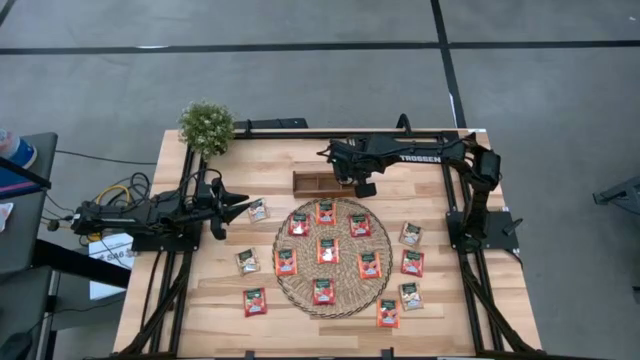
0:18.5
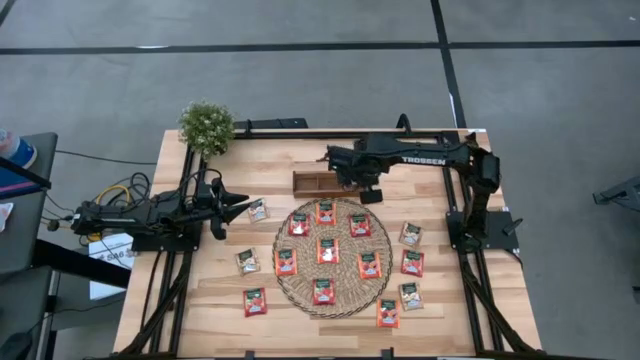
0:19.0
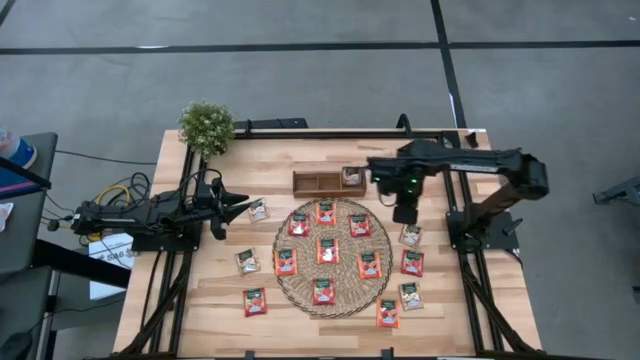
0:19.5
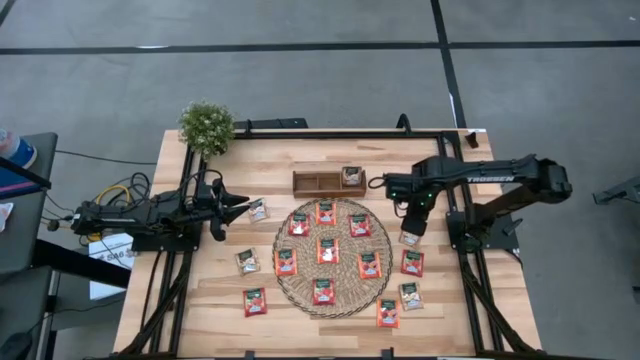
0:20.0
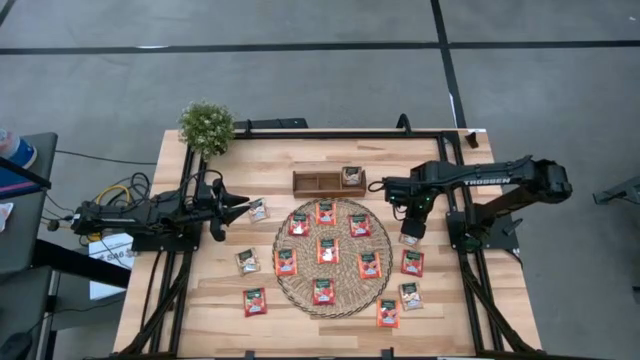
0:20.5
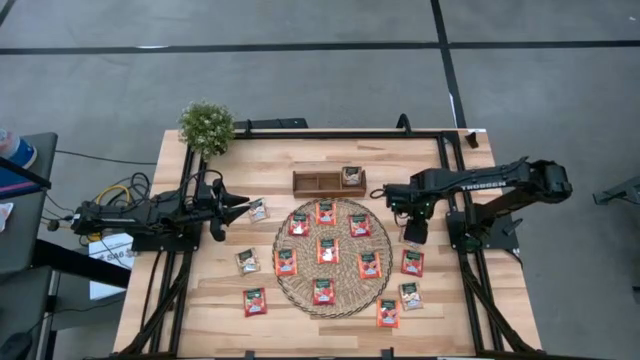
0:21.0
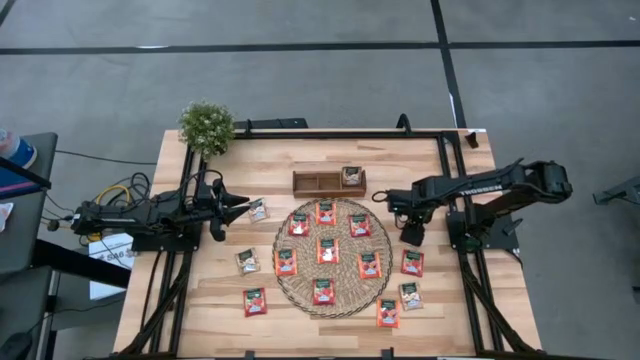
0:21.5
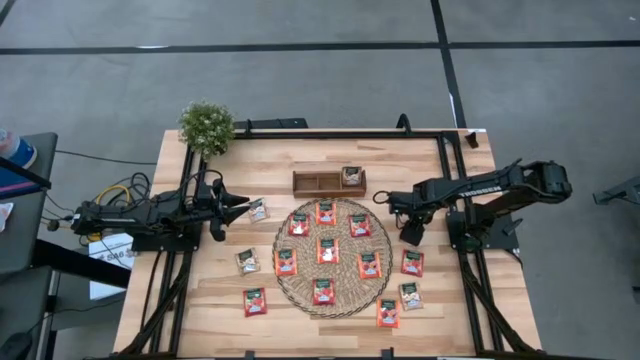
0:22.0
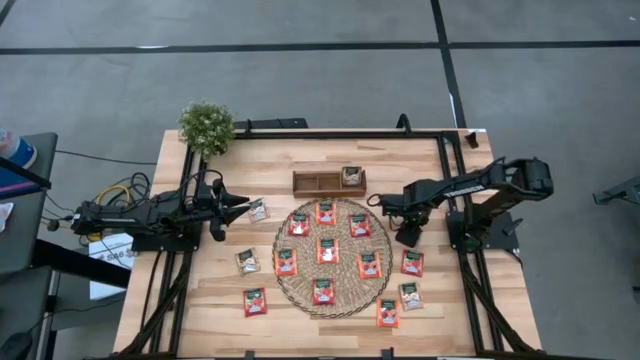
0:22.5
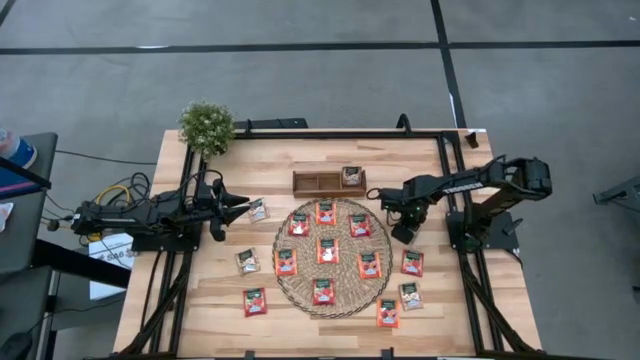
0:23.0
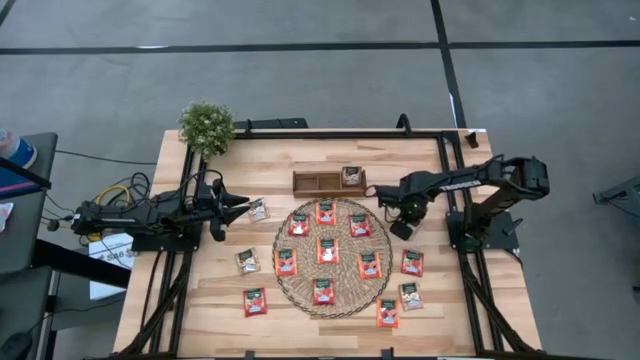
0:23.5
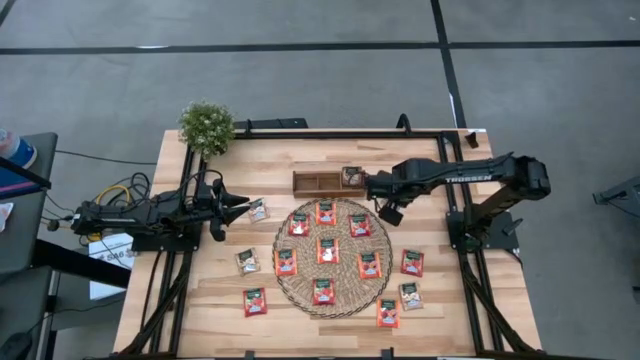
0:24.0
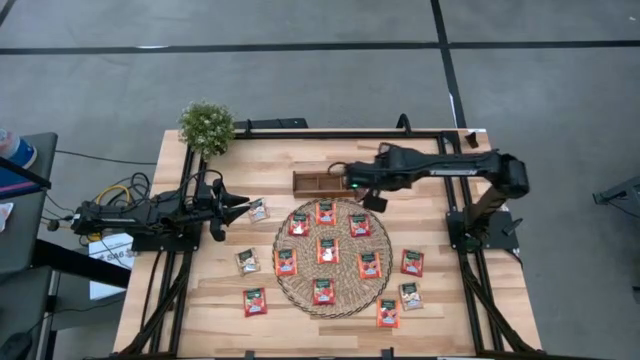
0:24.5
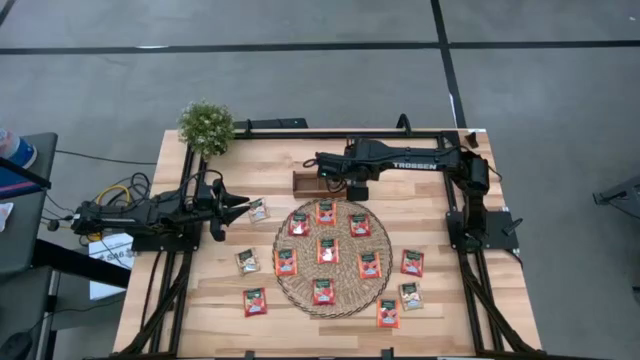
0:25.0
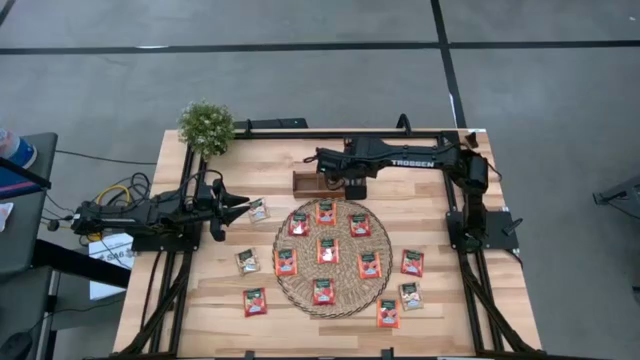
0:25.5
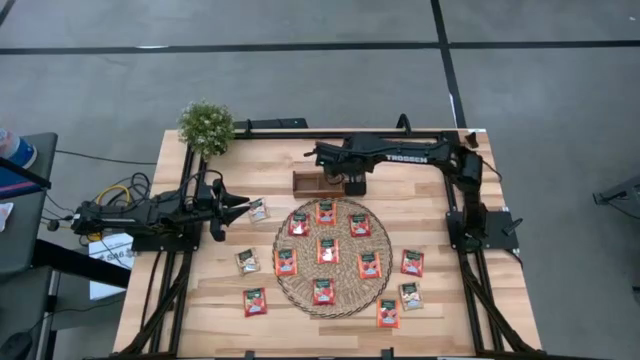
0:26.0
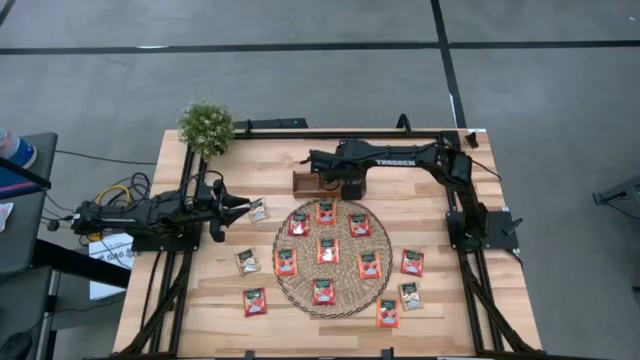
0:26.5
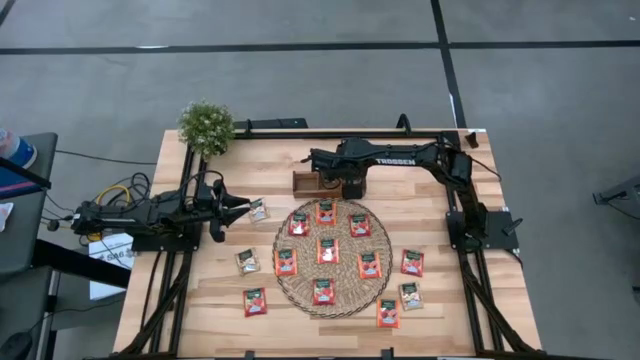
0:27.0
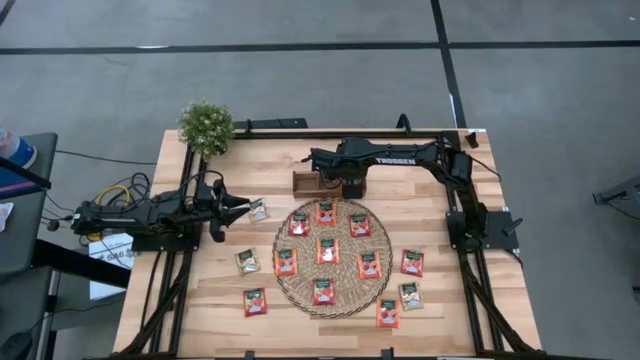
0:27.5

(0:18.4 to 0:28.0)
Task: Pick & Place Tea
Put the brown tea bag into the right section of the wooden organizer

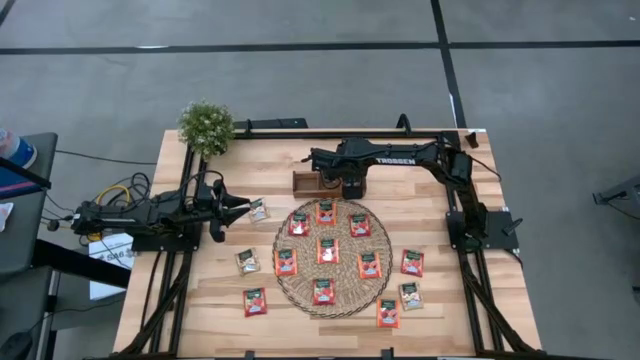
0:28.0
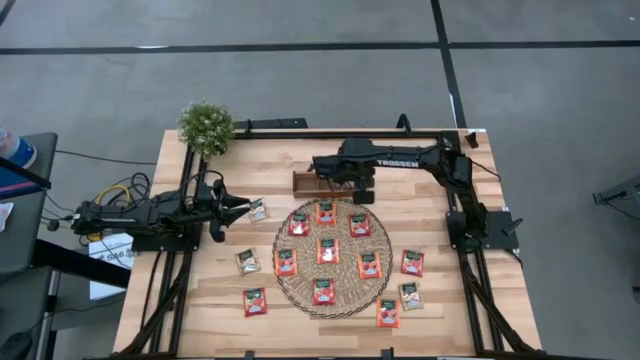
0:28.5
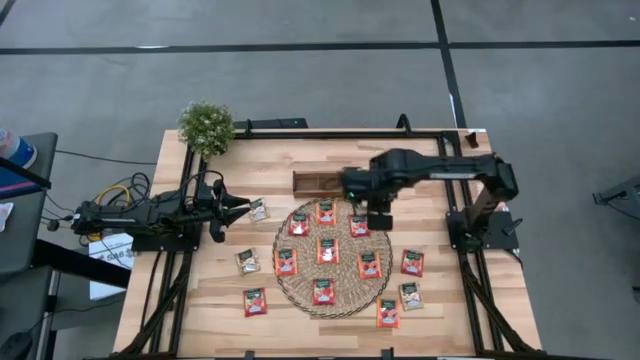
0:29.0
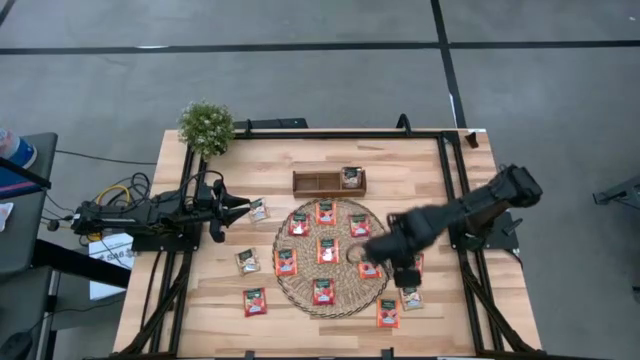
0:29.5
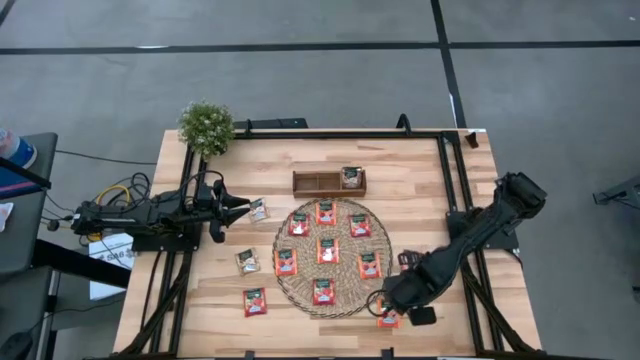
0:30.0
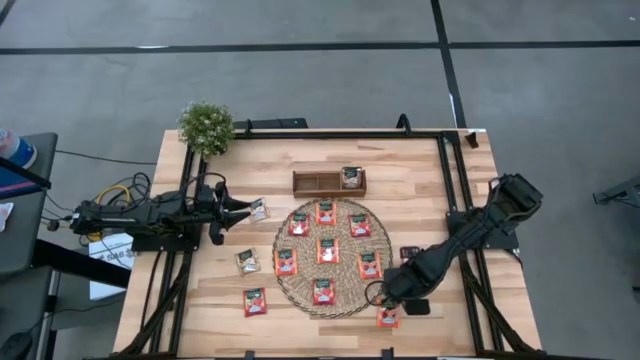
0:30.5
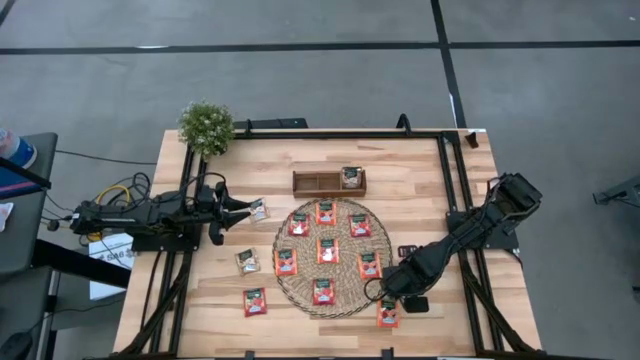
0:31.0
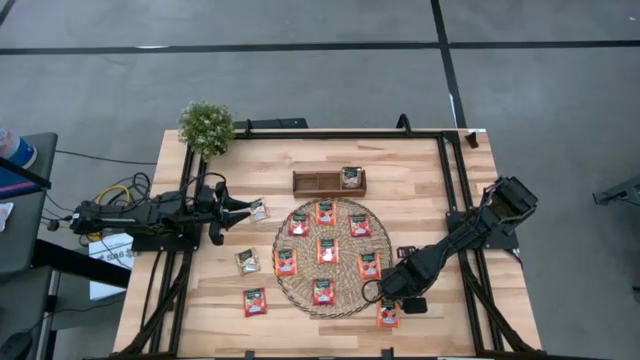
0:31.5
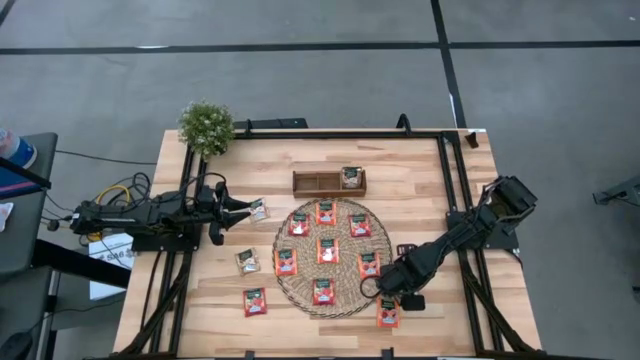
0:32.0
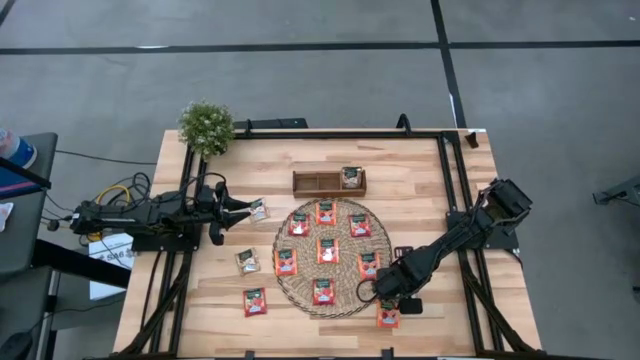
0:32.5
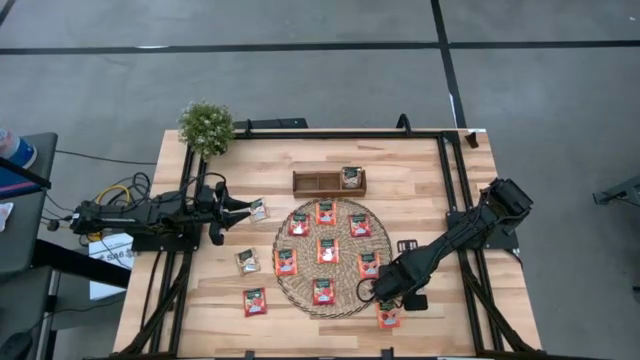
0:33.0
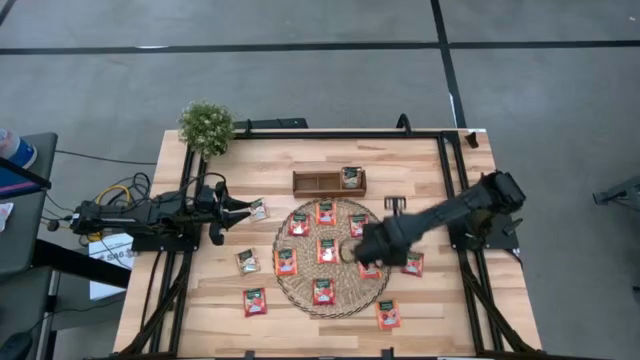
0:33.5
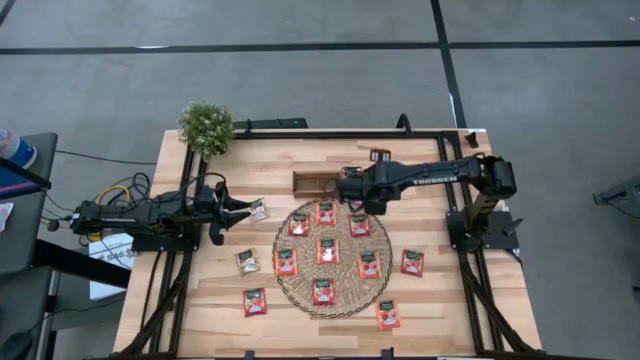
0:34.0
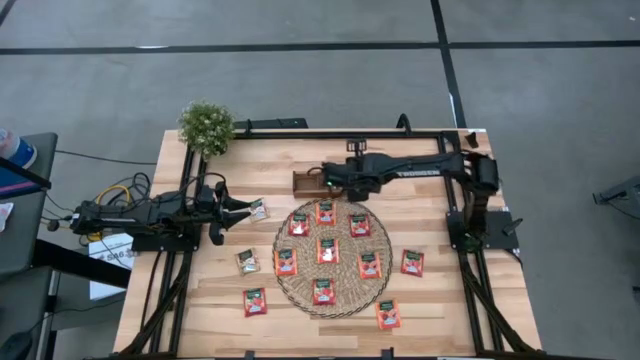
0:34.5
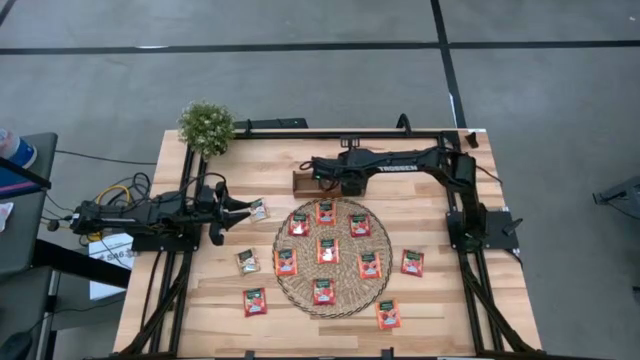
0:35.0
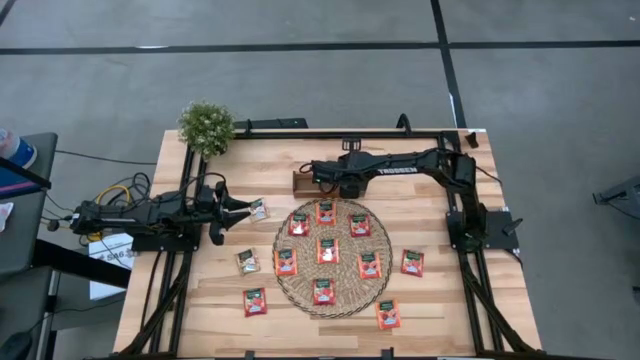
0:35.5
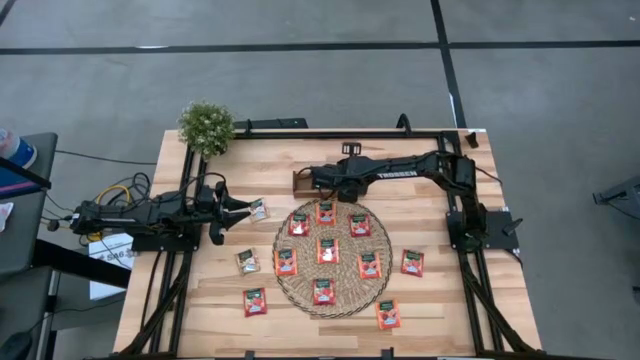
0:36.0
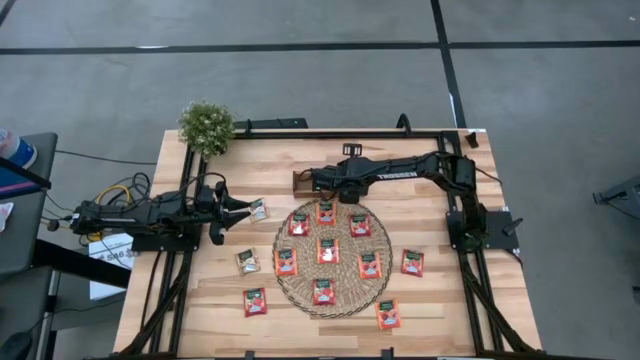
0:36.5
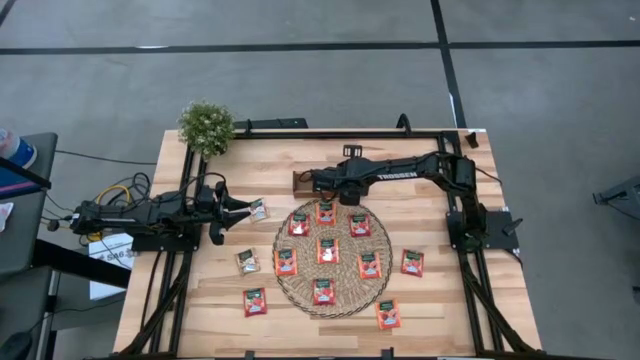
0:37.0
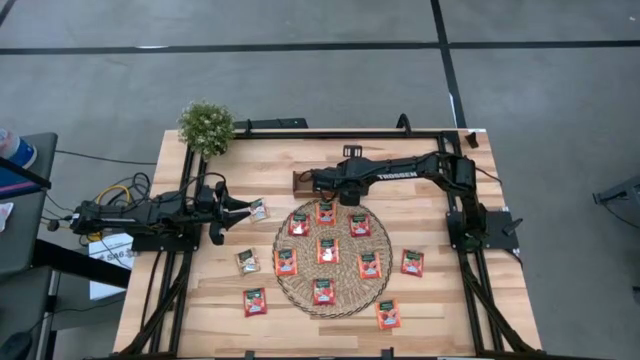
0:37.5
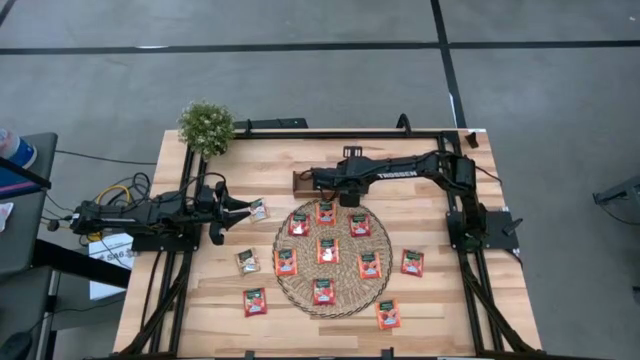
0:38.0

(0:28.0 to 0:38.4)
Put the brown tea bag into the right section of the wooden organizer
